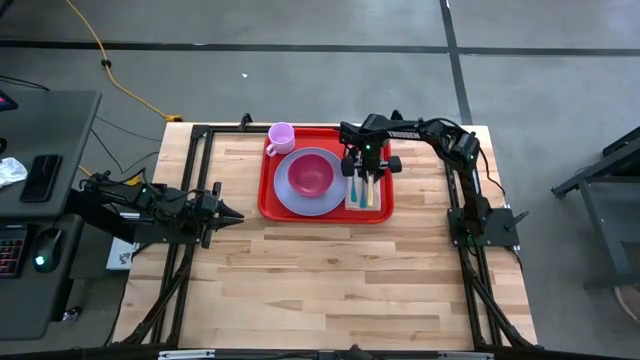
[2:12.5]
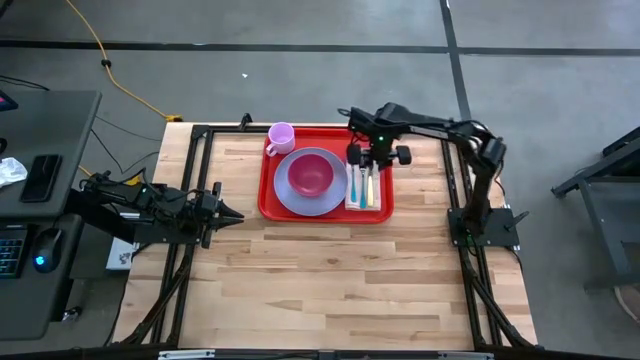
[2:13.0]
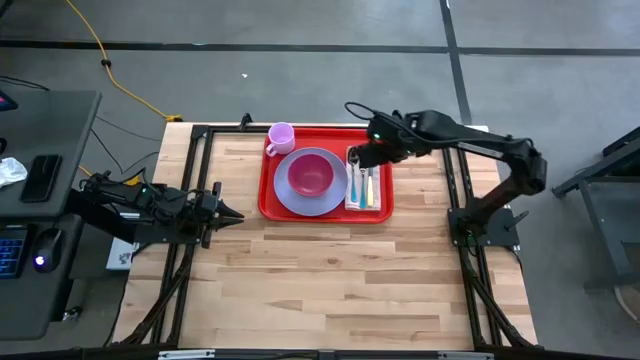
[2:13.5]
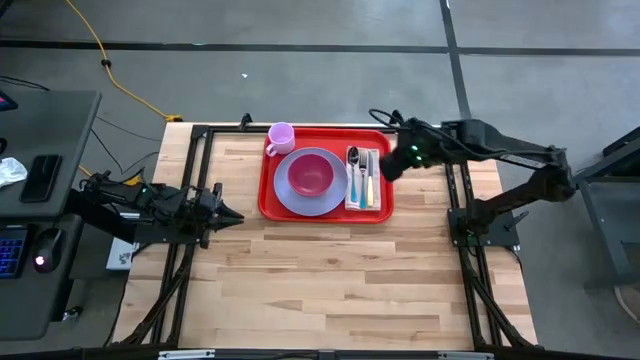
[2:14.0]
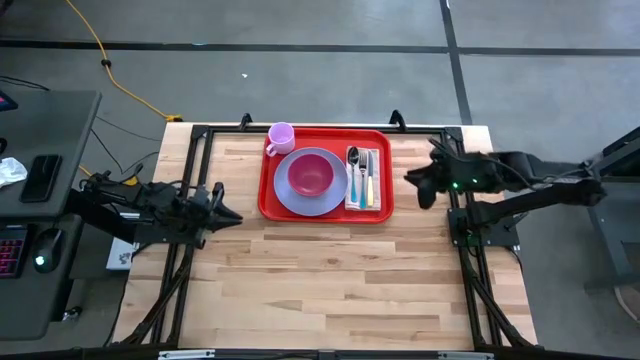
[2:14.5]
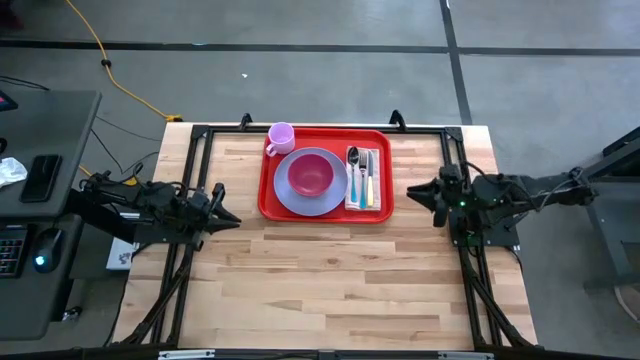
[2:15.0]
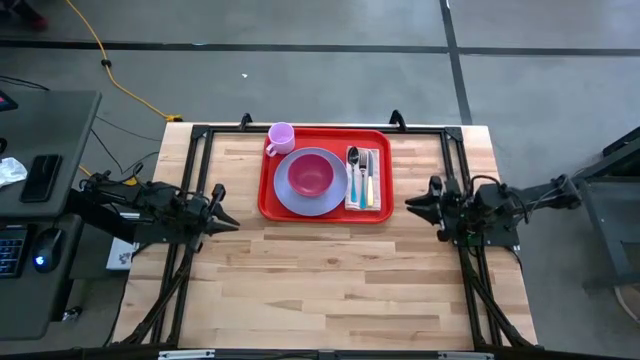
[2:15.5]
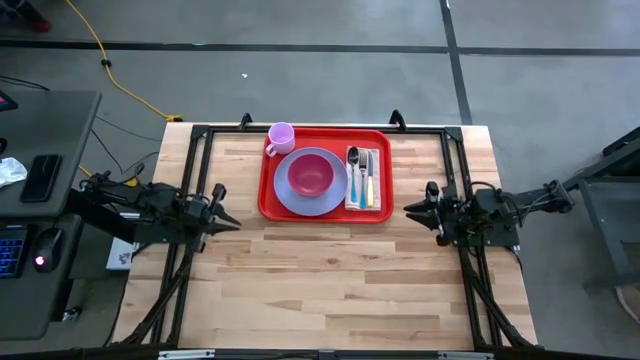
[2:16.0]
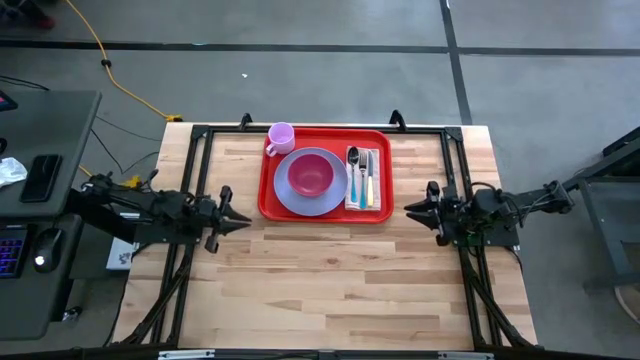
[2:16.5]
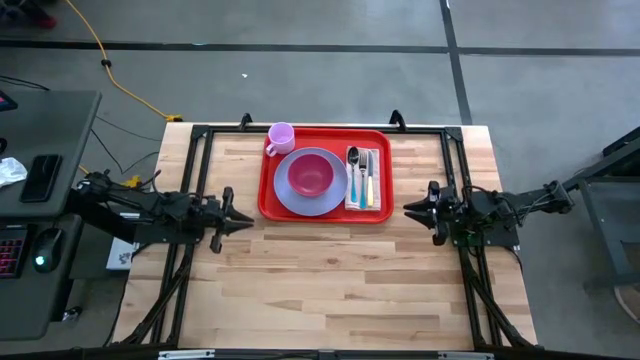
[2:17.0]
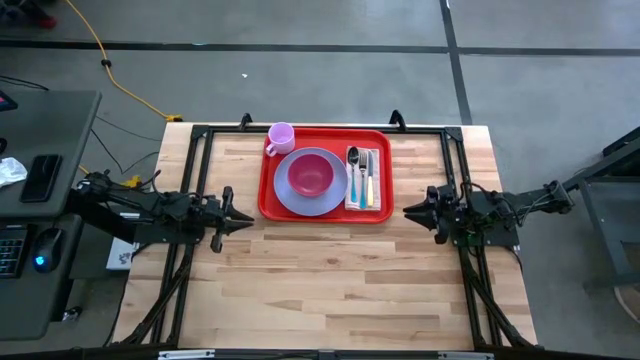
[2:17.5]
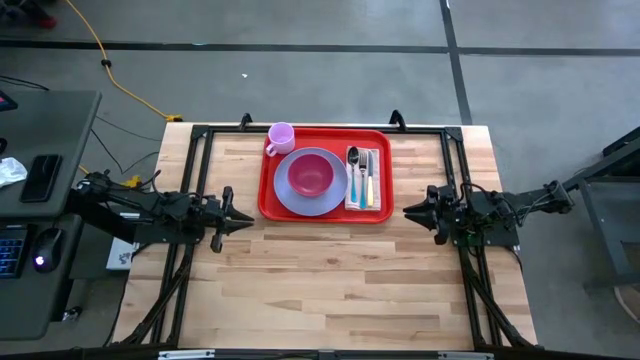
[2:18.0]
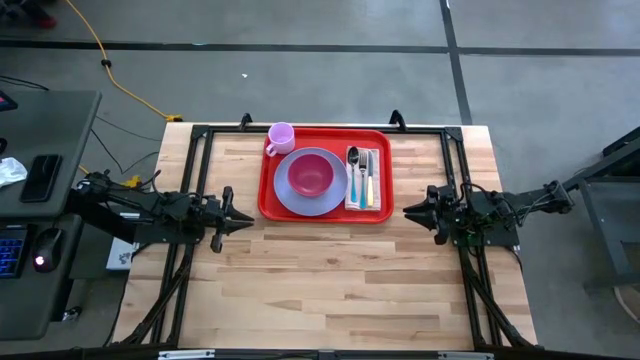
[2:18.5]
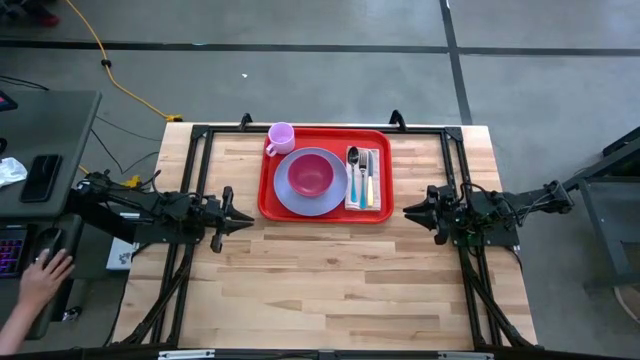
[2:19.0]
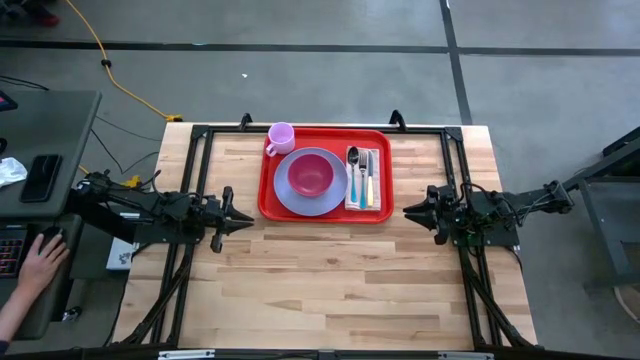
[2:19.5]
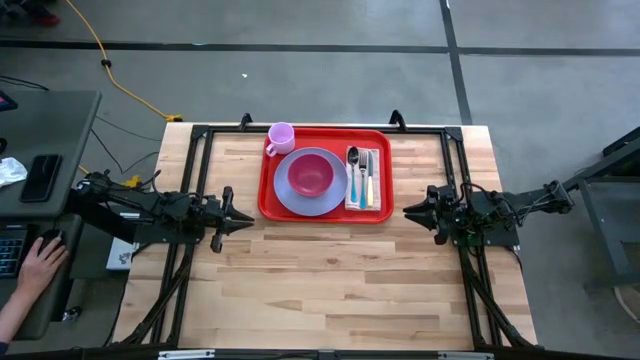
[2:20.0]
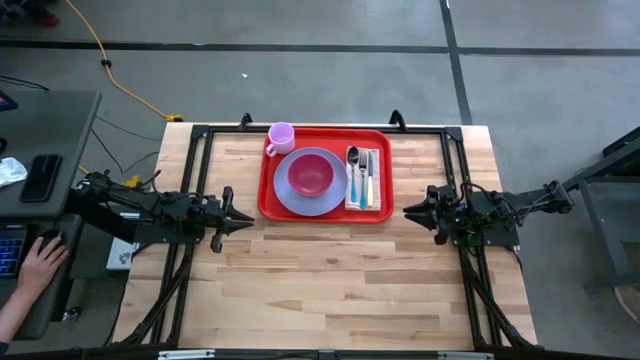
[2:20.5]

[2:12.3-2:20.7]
Task: Set up tray
Return to Home Position

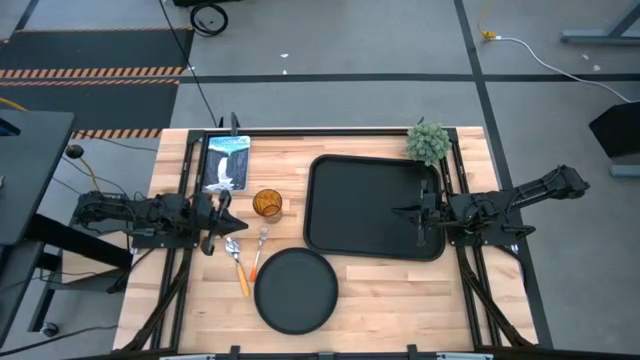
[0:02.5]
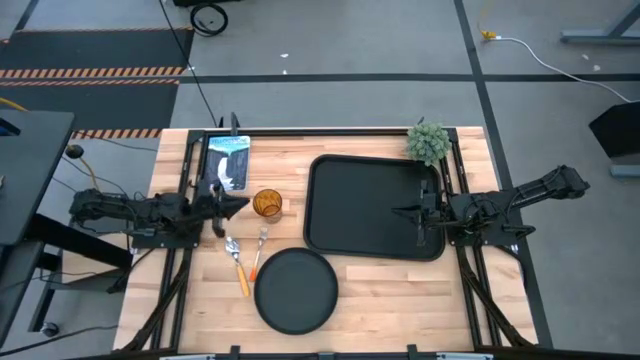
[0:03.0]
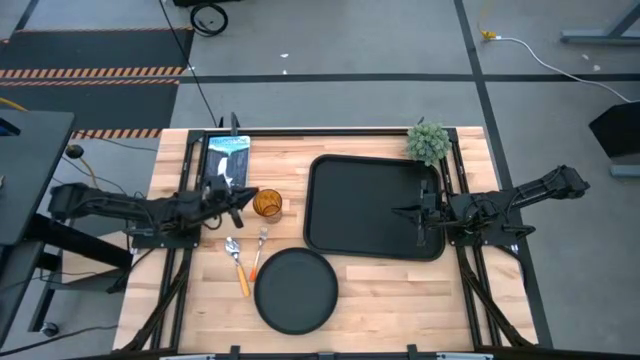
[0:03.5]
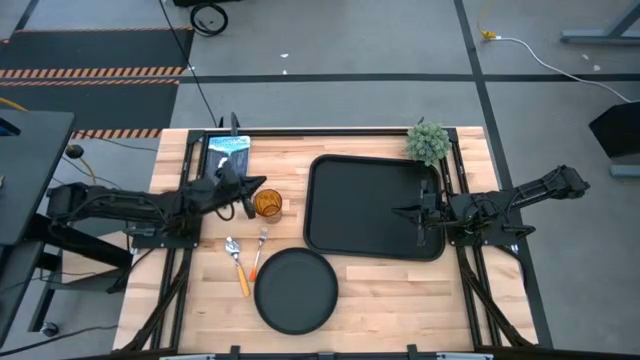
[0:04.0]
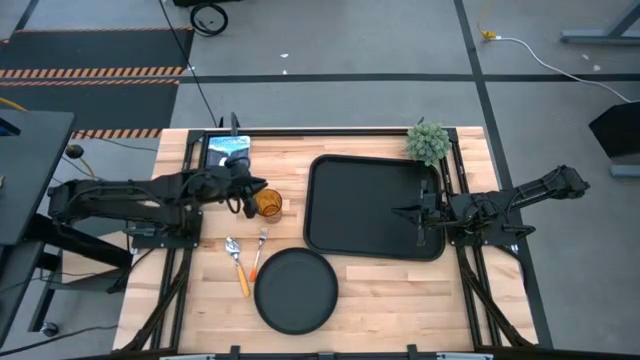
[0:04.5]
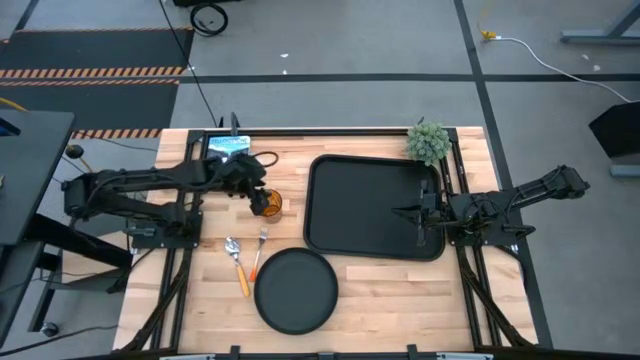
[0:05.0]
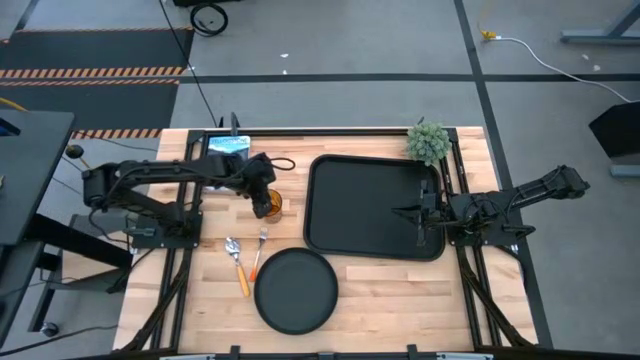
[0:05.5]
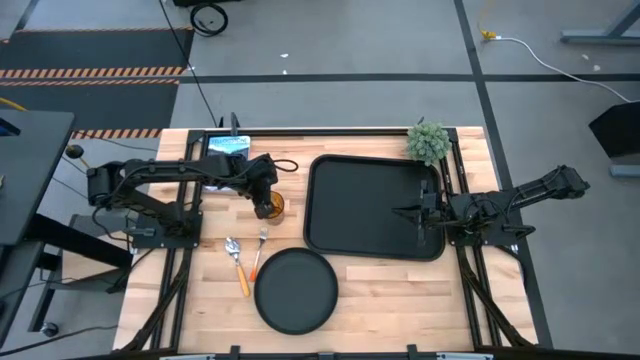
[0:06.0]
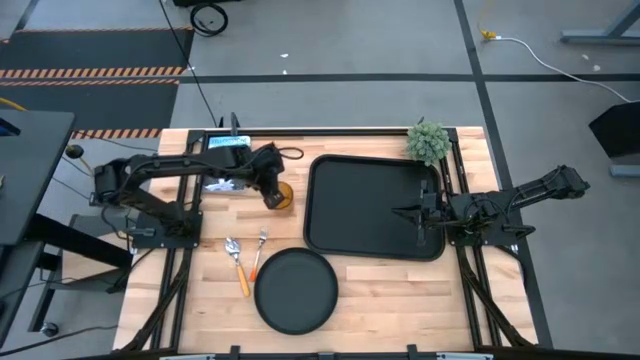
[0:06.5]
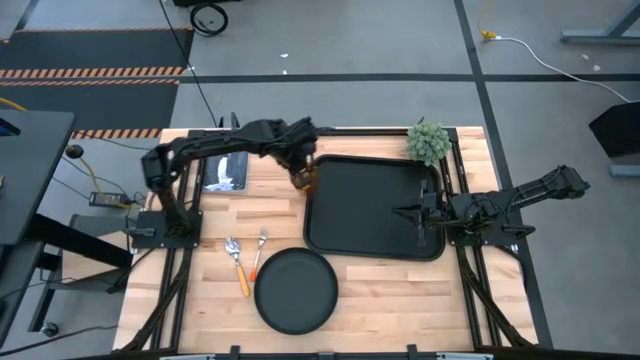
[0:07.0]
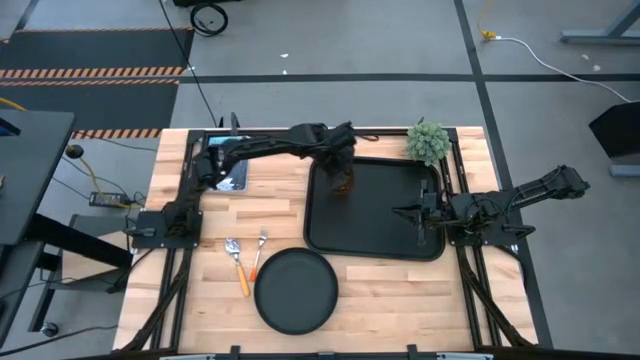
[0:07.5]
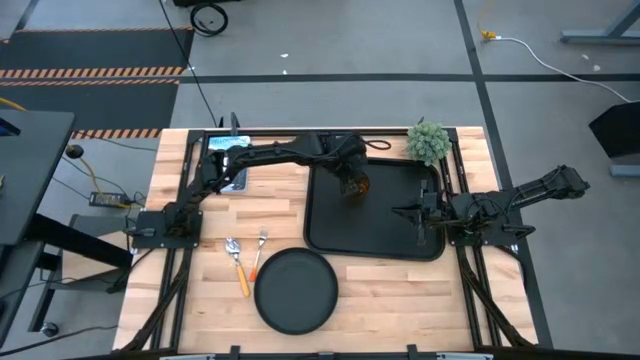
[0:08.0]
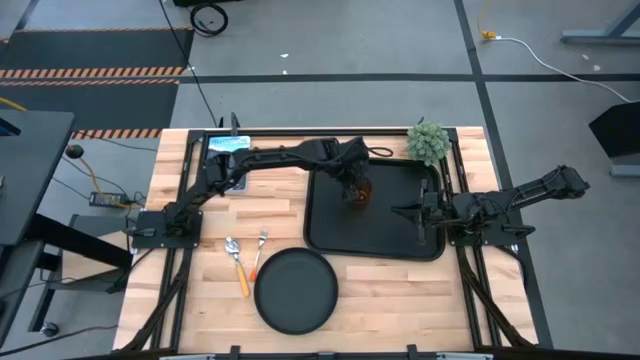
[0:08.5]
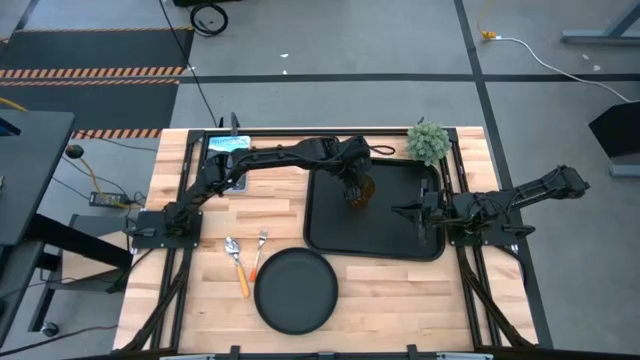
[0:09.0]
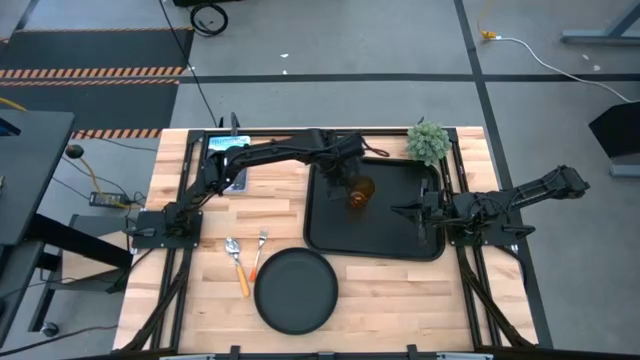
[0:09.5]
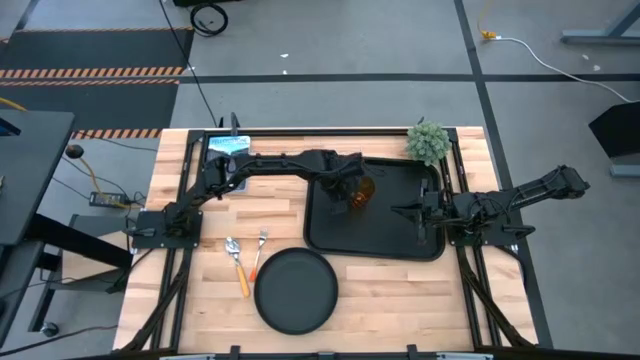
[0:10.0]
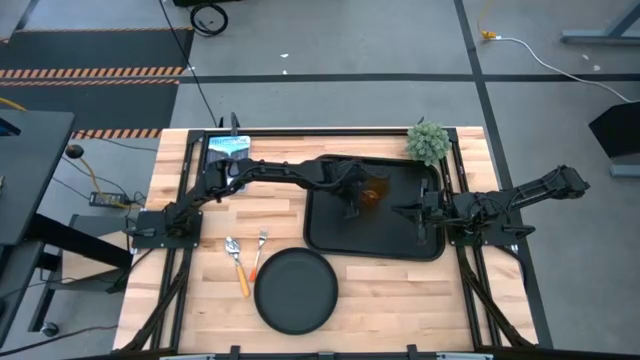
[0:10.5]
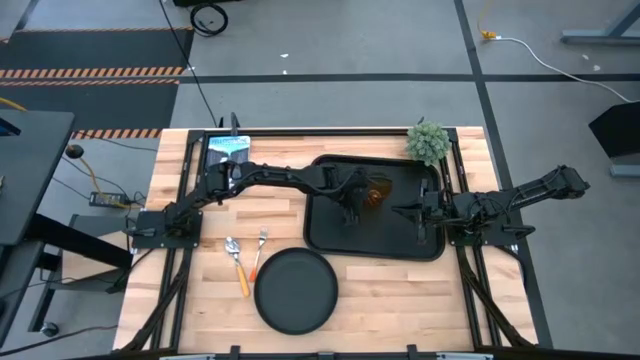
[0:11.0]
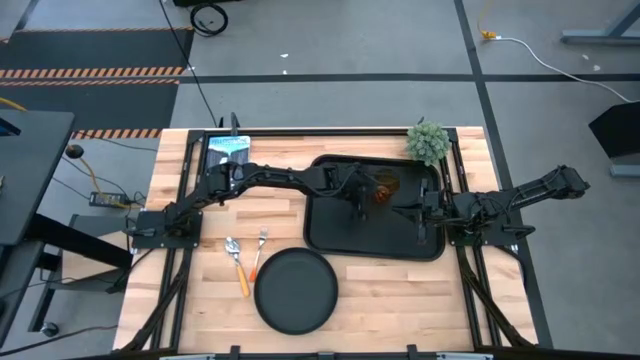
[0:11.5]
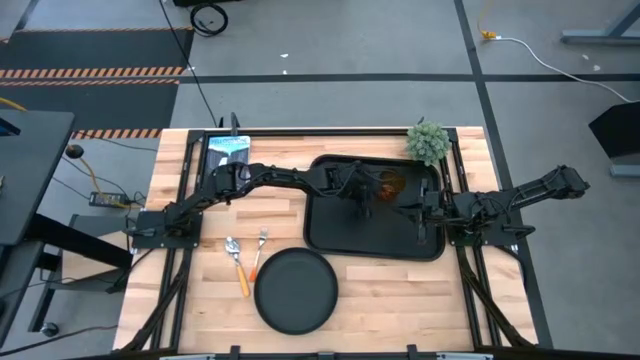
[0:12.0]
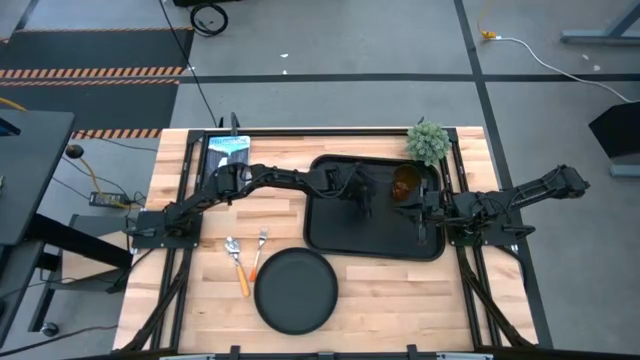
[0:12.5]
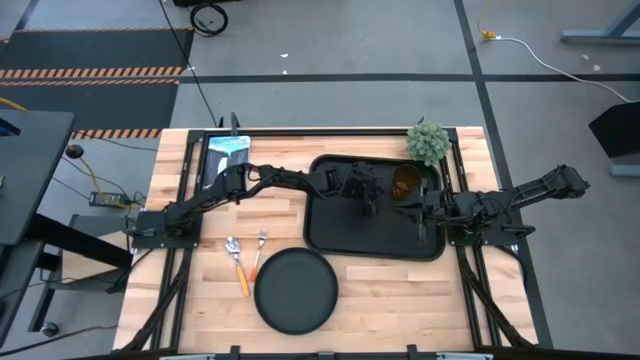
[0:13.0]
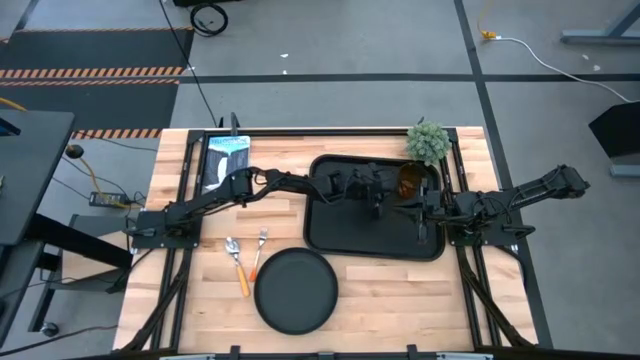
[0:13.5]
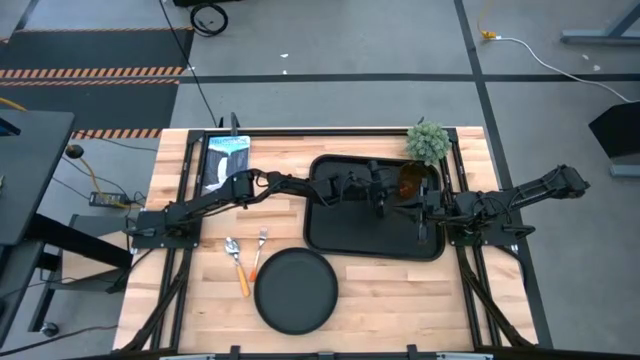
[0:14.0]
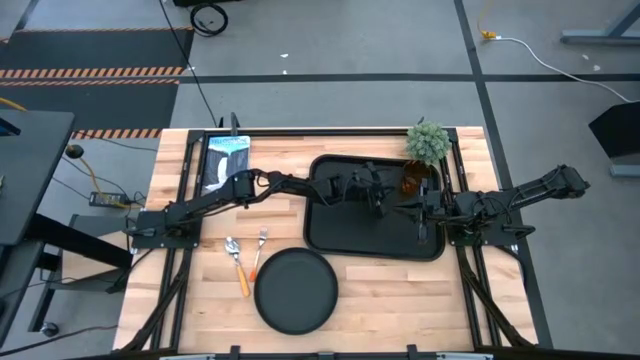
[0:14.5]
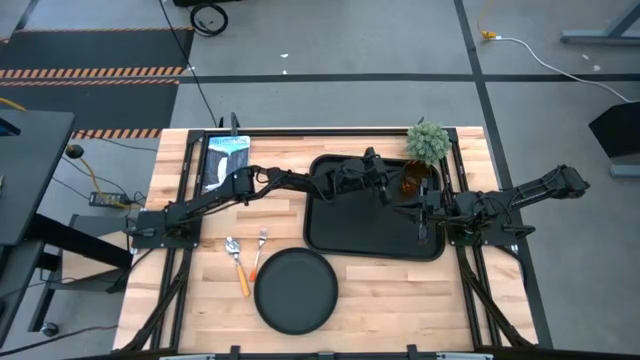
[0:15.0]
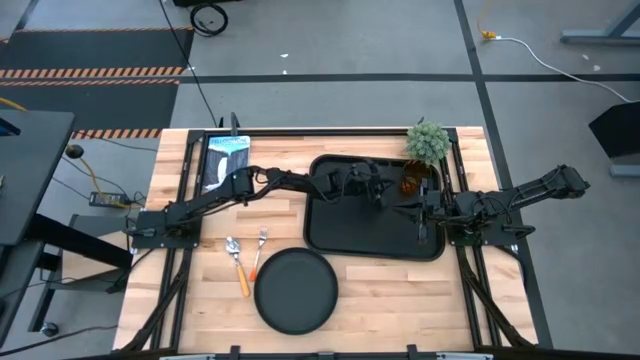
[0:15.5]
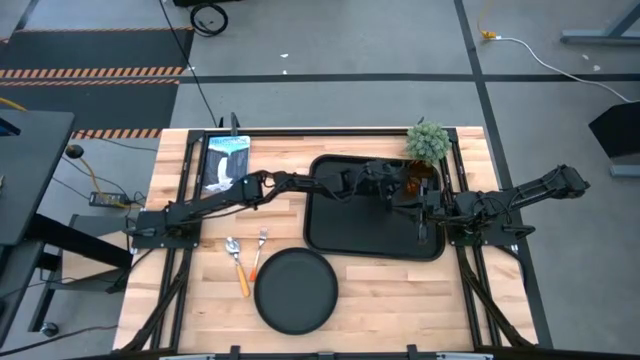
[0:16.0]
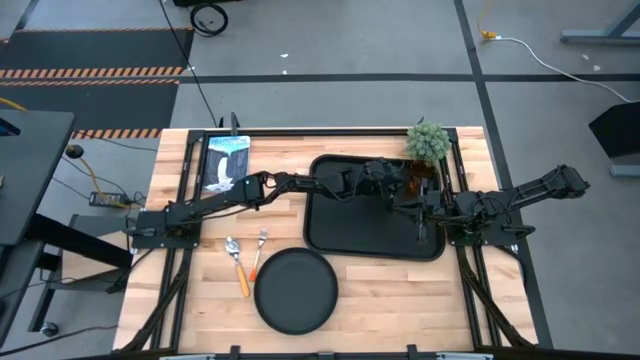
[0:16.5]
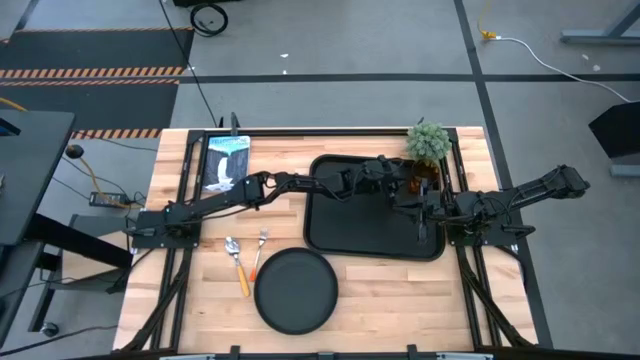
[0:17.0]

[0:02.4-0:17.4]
Task: Pick and place plate/cup/fork/spoon on tray
Put the brown cup on the black serving tray
